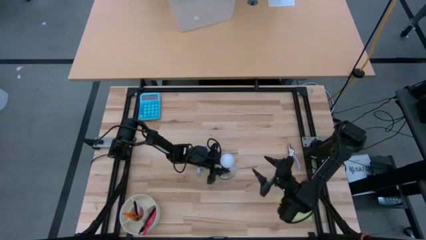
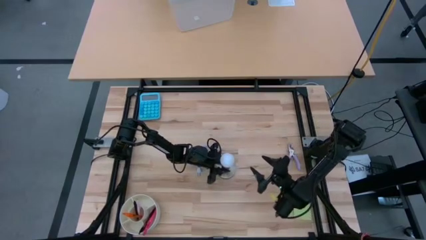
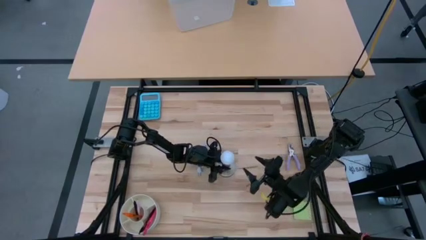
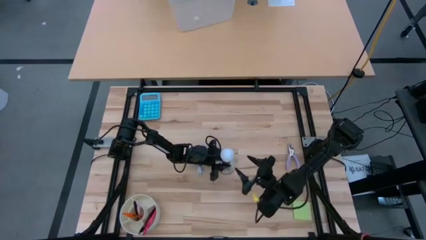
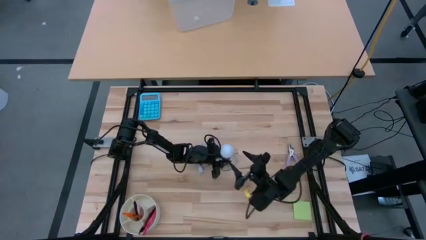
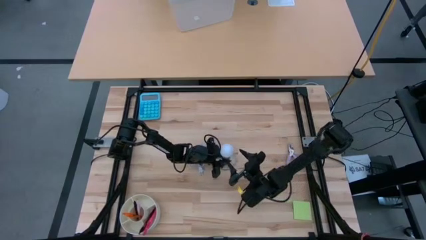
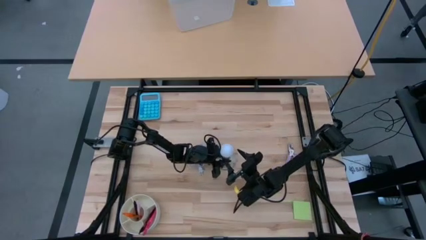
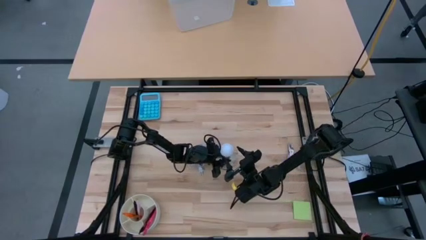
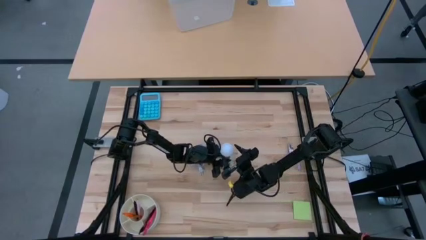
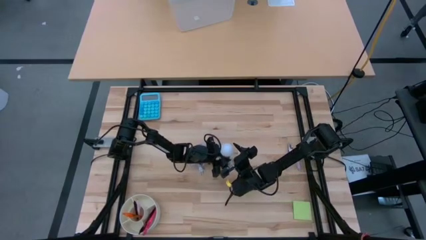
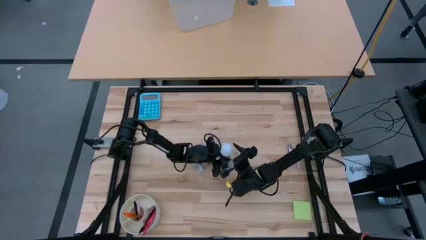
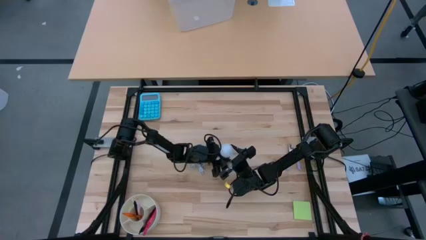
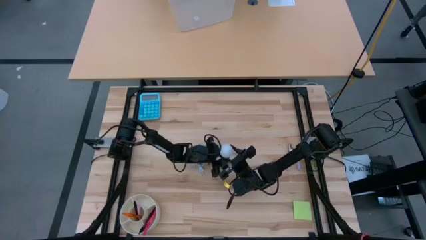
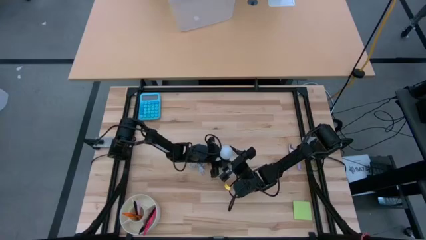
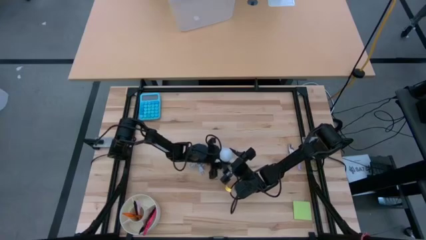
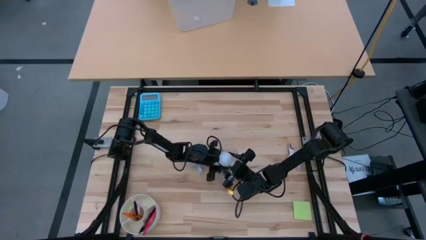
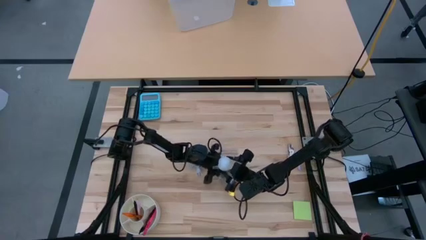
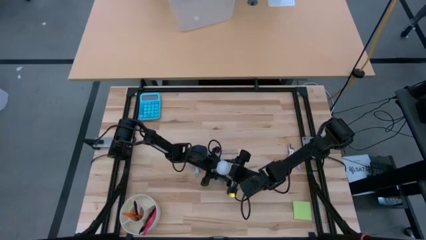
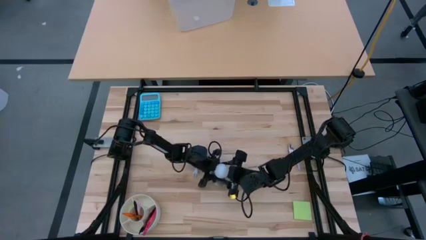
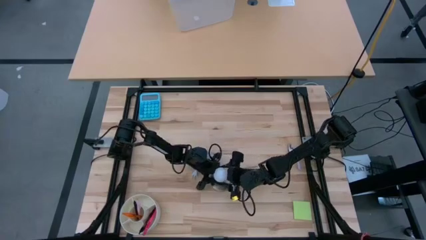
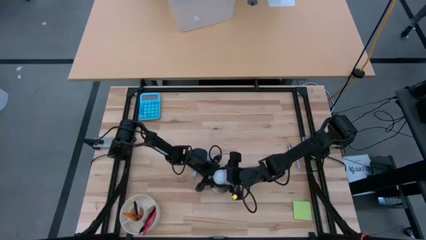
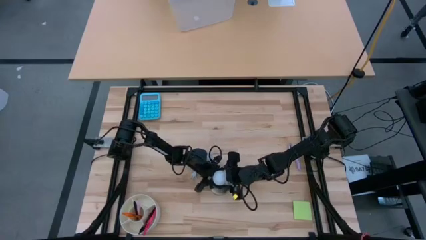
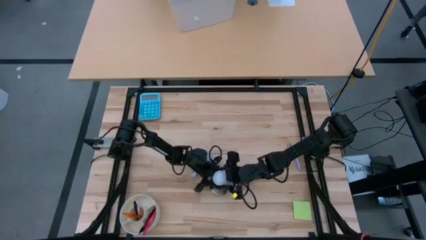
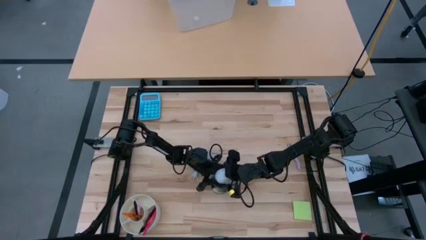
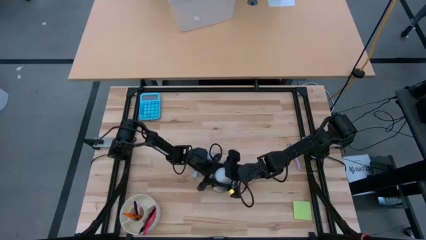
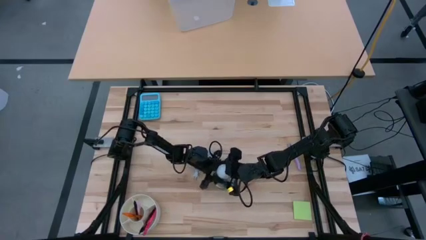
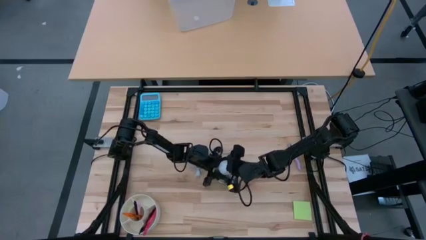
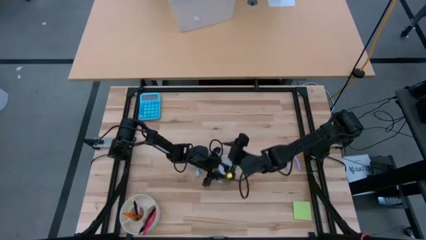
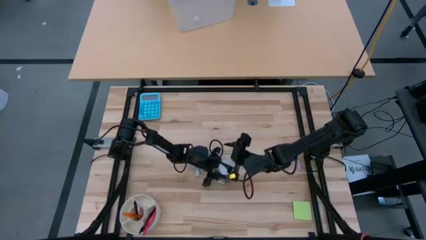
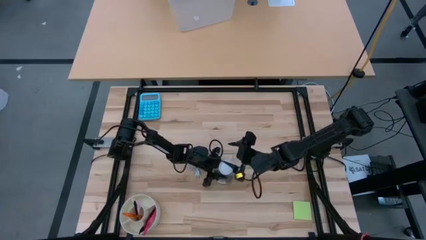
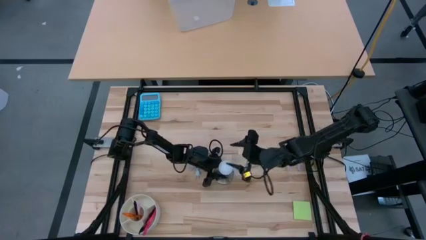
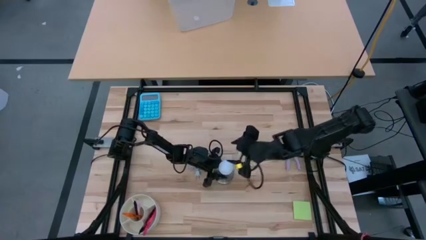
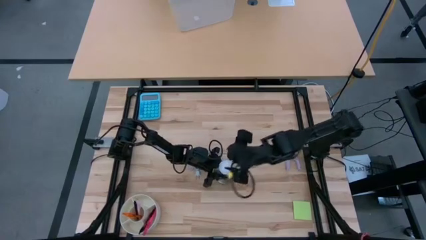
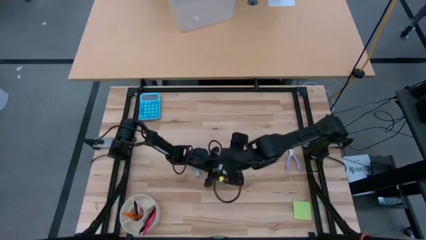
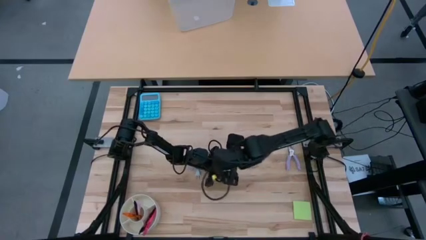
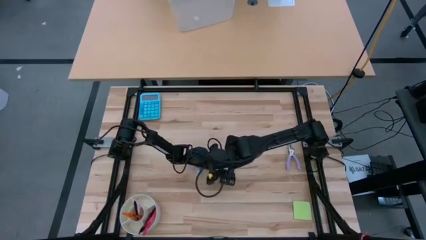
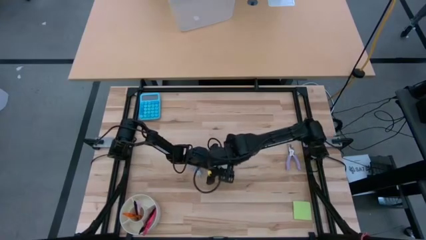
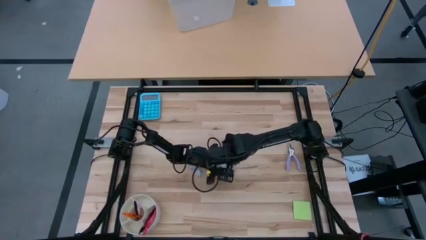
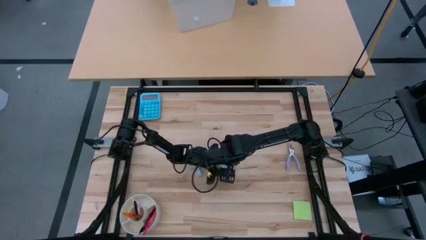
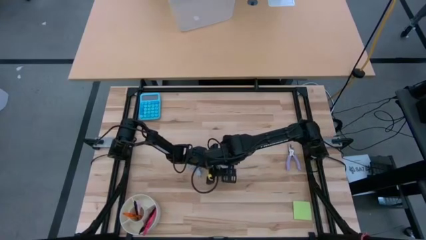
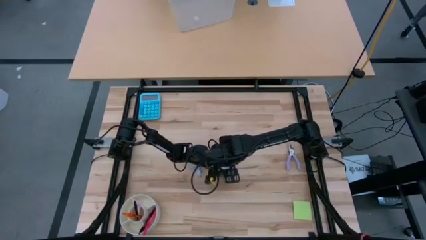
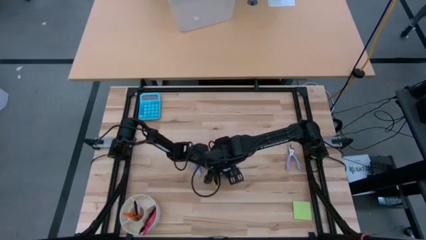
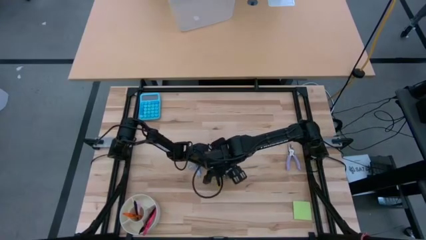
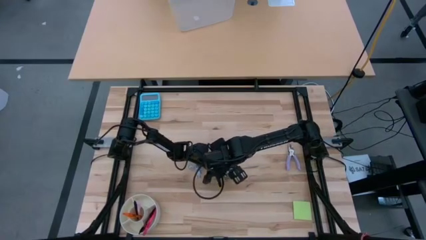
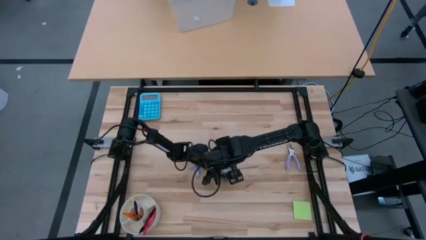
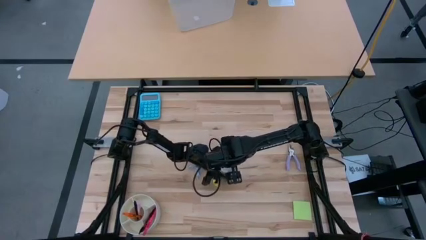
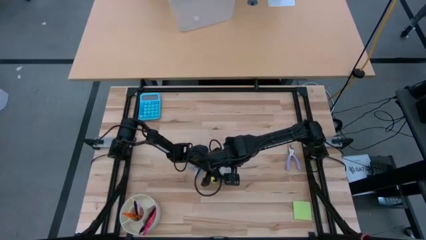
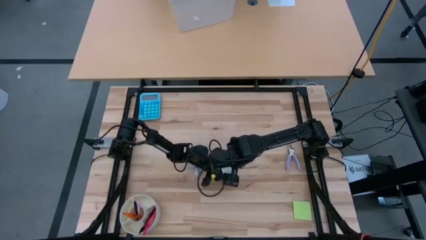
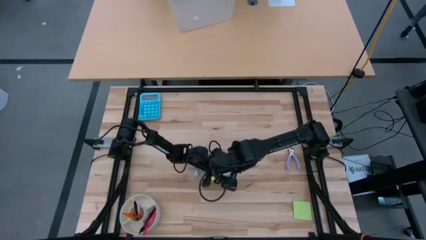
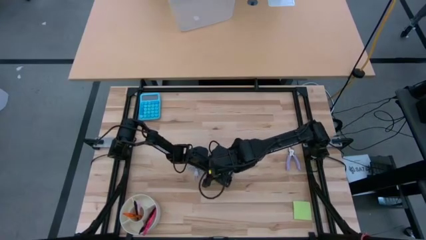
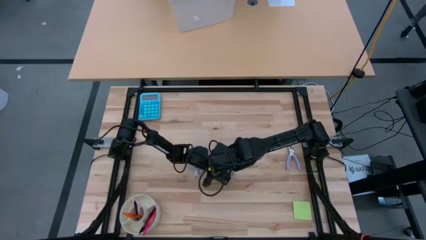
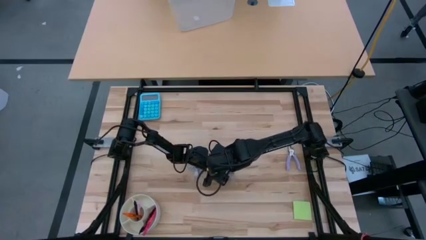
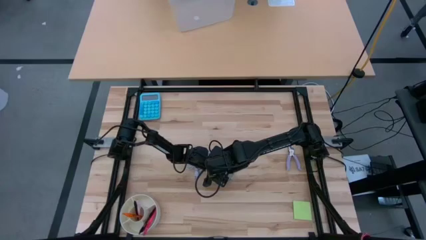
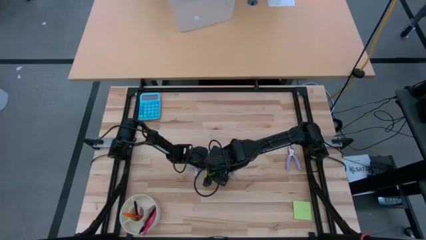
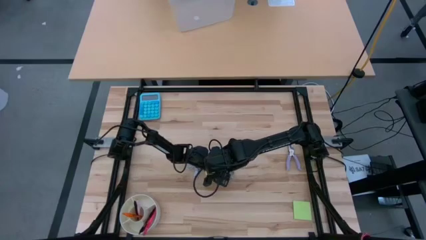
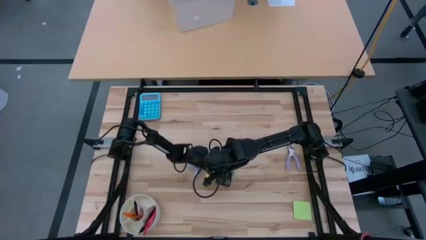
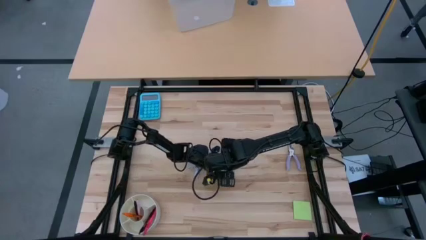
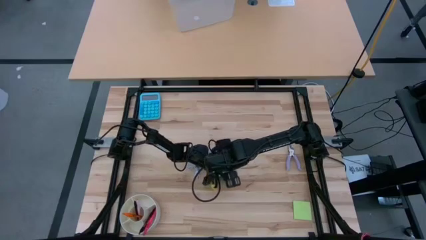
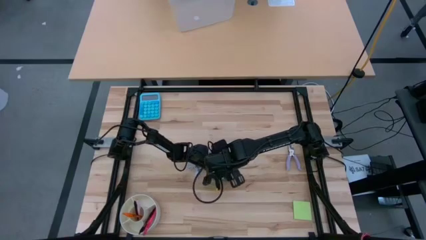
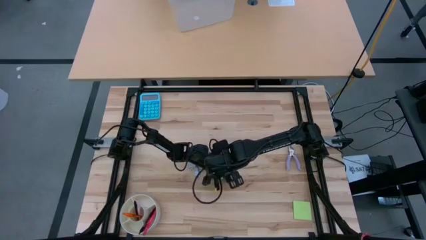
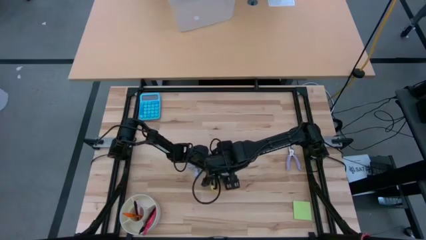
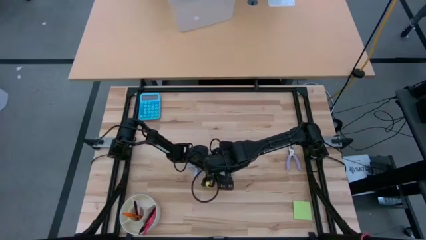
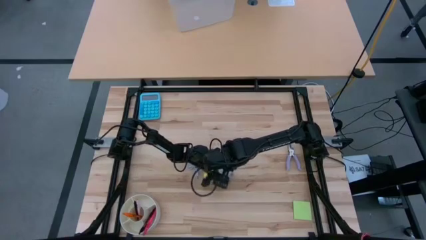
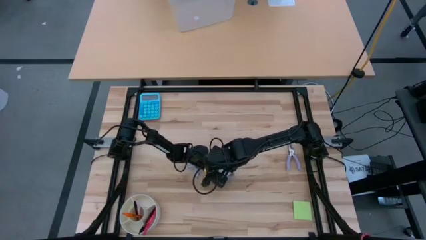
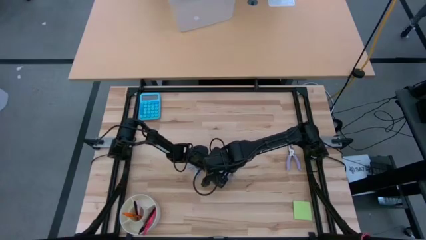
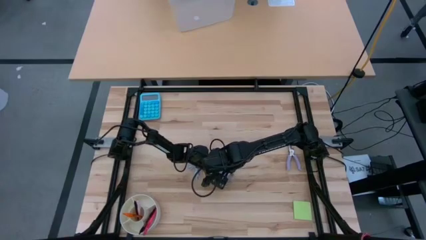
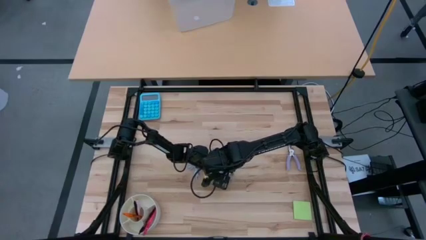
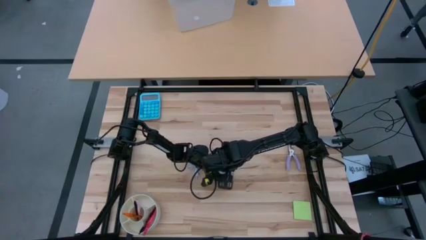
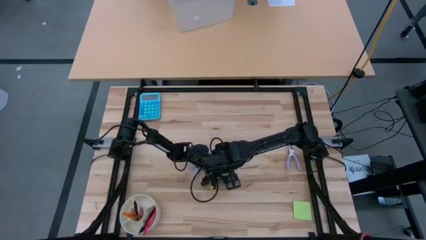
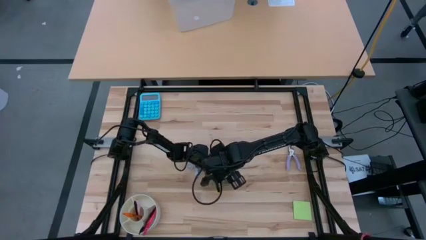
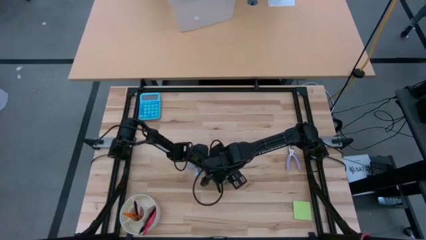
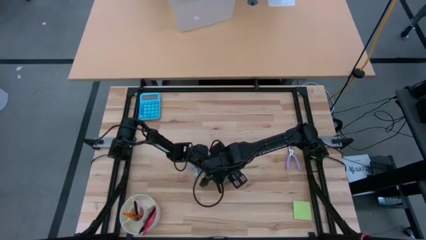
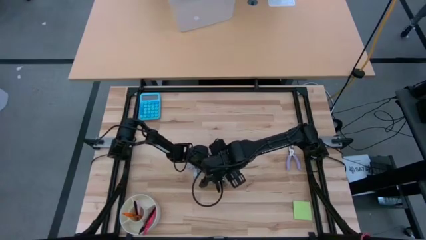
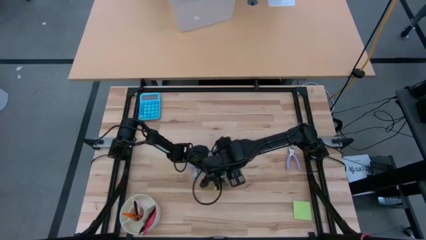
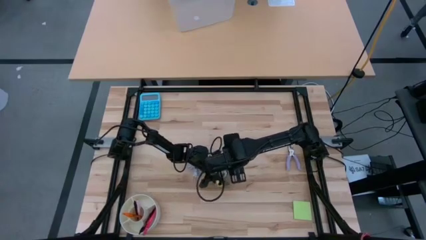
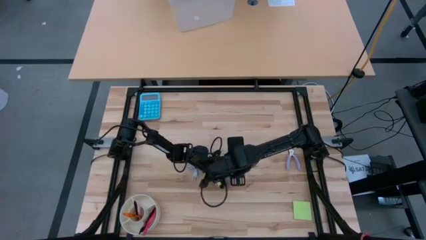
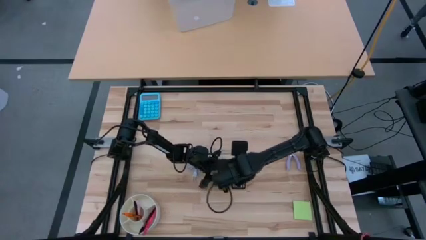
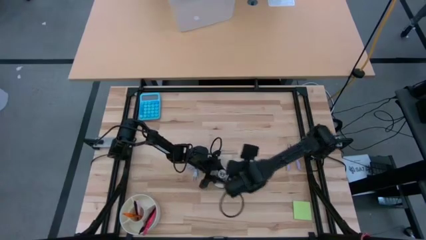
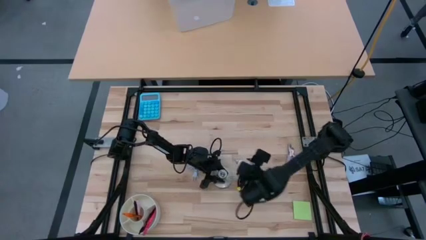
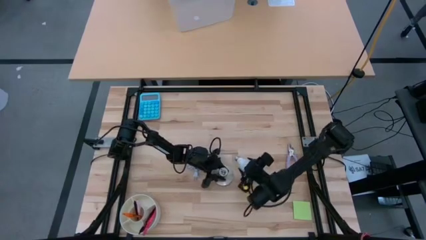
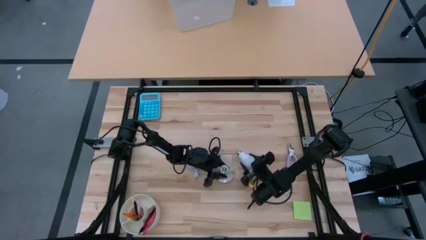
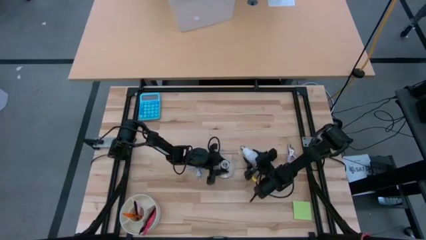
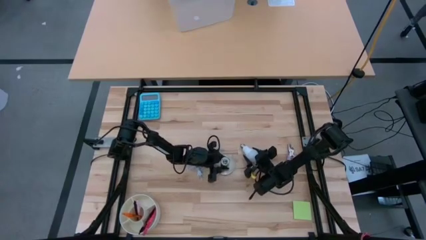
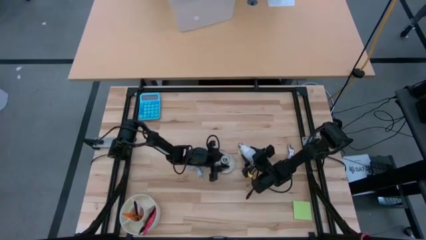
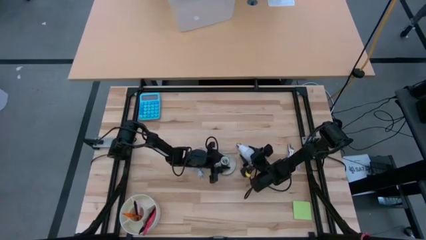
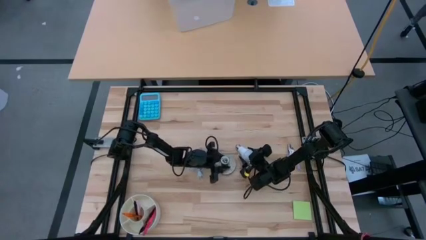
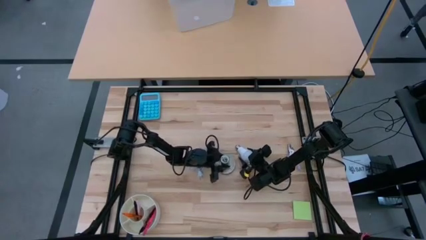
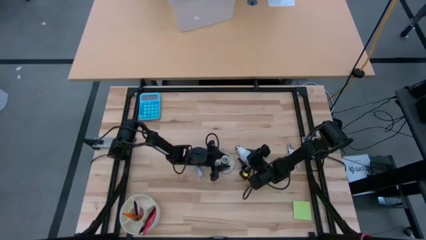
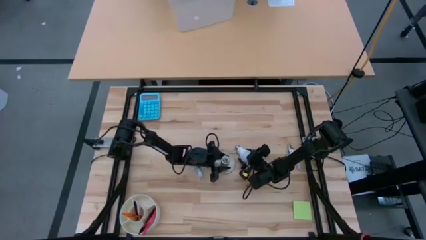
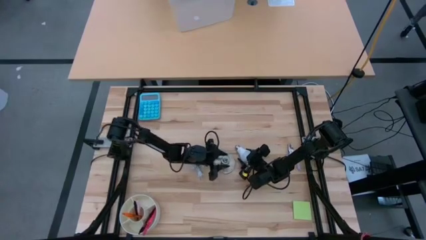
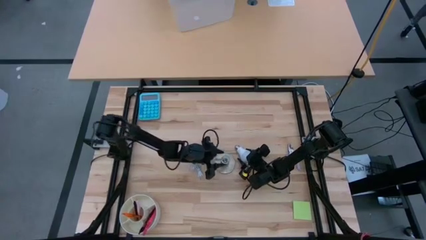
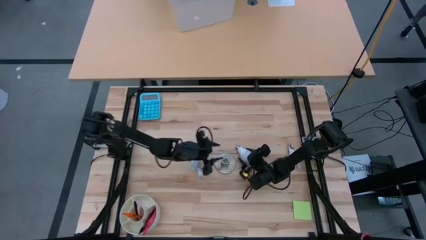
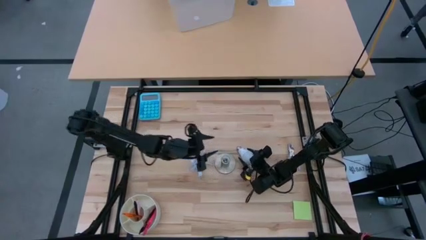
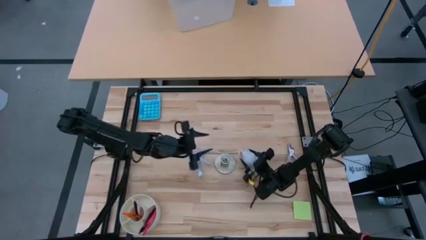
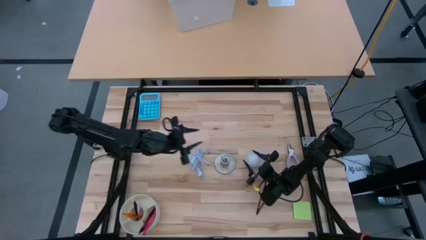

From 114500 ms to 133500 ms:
Task: Screw lightbulb
Remove the light bulb from the lamp
